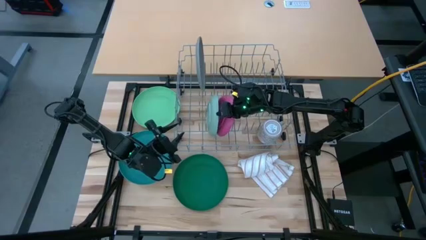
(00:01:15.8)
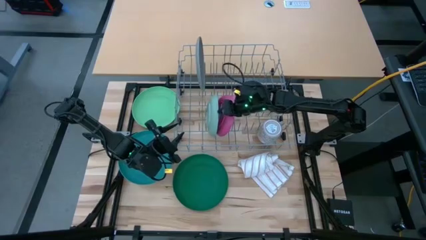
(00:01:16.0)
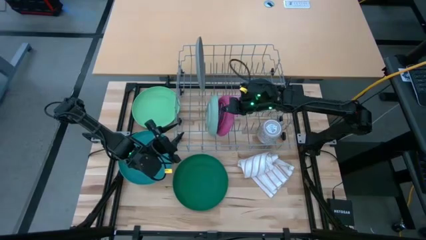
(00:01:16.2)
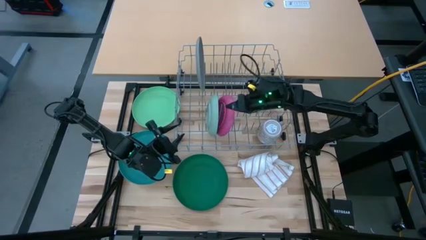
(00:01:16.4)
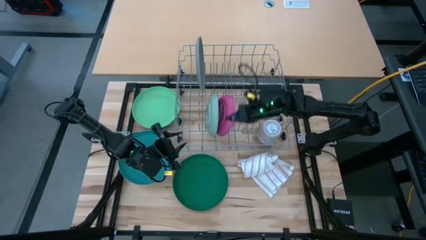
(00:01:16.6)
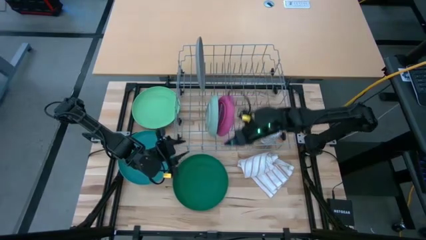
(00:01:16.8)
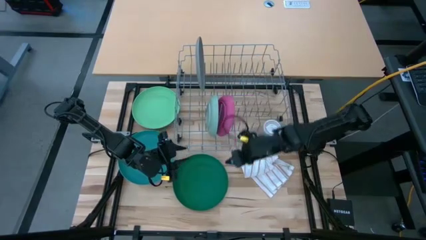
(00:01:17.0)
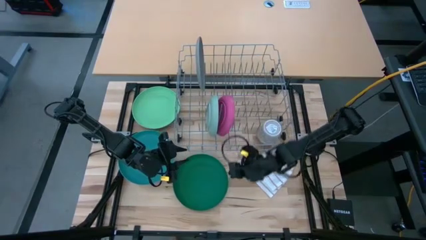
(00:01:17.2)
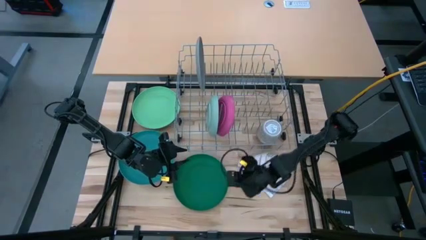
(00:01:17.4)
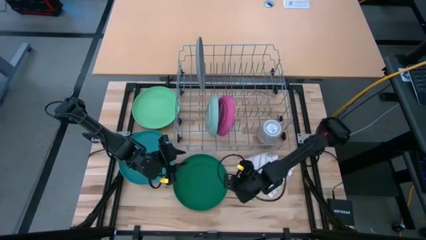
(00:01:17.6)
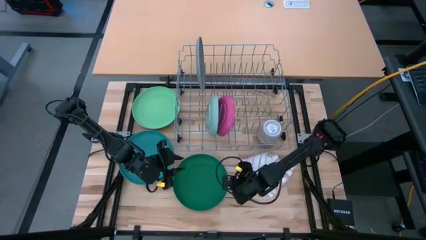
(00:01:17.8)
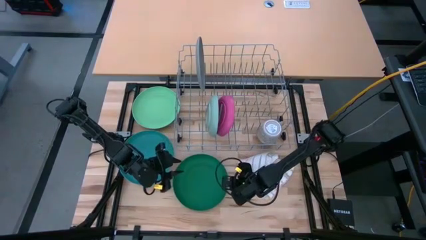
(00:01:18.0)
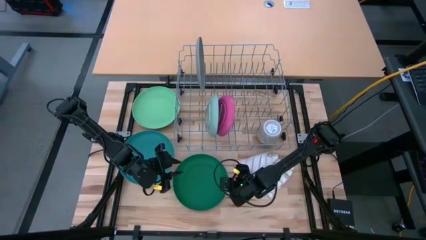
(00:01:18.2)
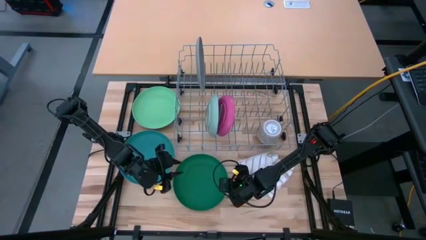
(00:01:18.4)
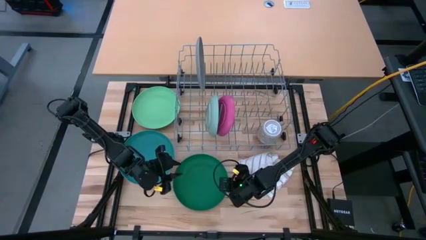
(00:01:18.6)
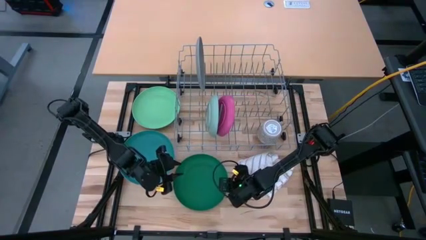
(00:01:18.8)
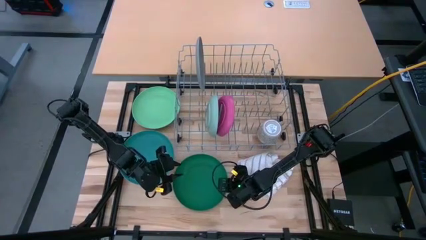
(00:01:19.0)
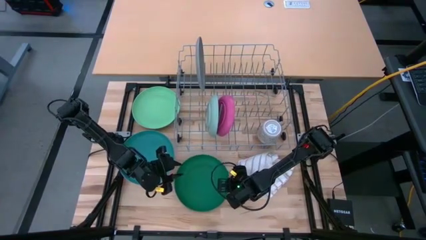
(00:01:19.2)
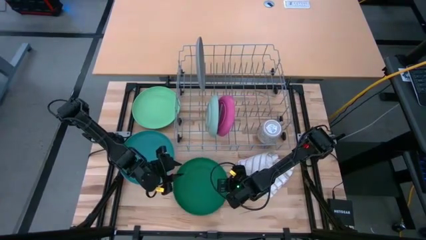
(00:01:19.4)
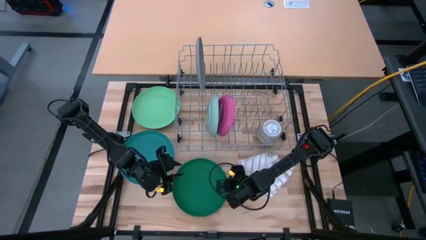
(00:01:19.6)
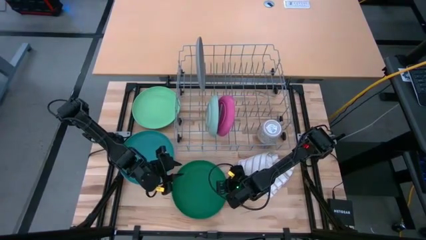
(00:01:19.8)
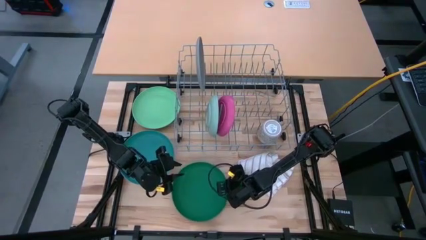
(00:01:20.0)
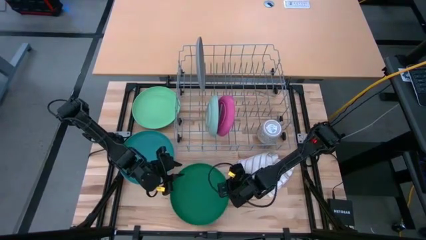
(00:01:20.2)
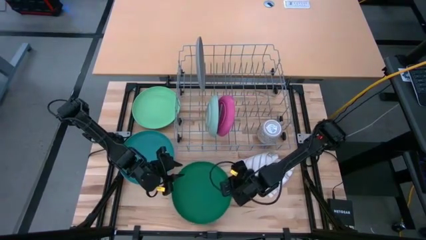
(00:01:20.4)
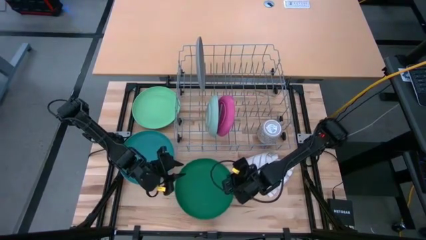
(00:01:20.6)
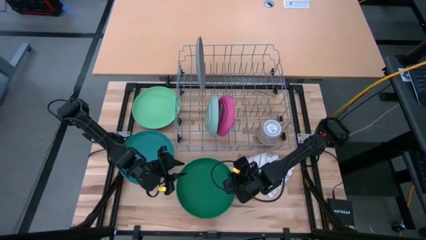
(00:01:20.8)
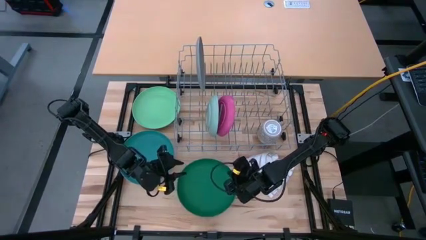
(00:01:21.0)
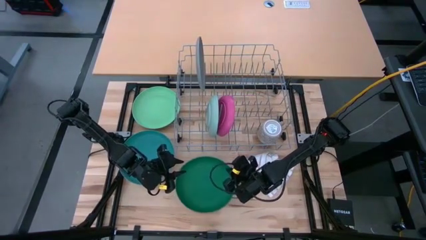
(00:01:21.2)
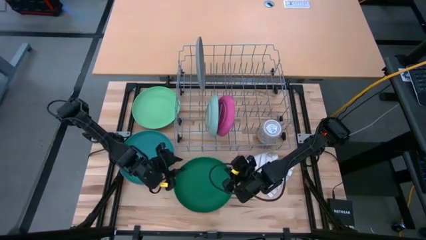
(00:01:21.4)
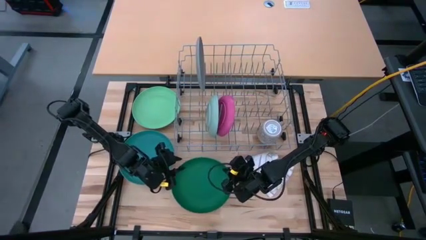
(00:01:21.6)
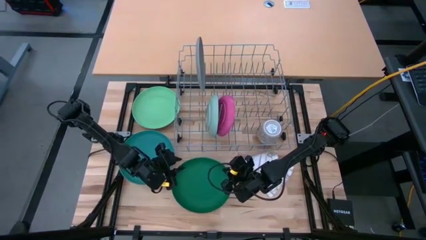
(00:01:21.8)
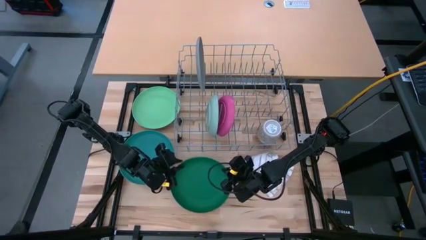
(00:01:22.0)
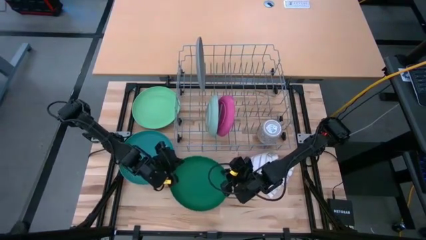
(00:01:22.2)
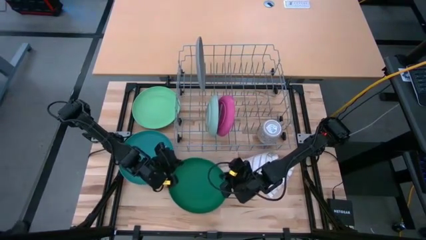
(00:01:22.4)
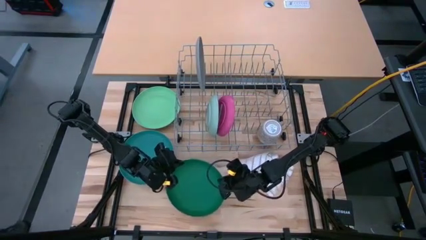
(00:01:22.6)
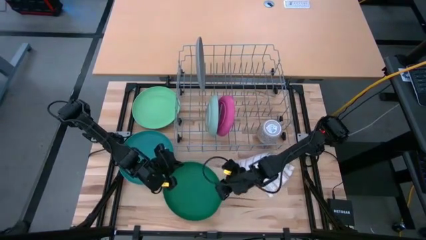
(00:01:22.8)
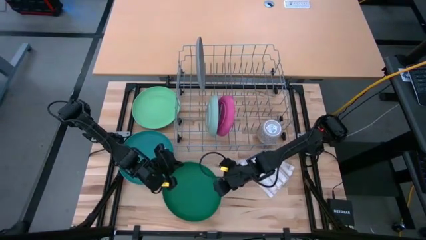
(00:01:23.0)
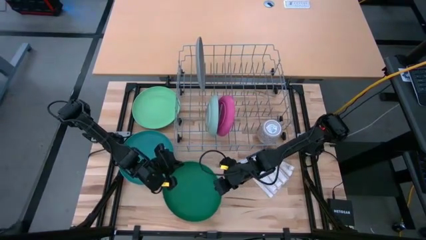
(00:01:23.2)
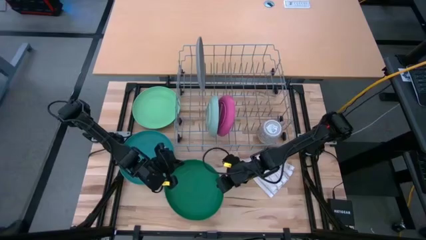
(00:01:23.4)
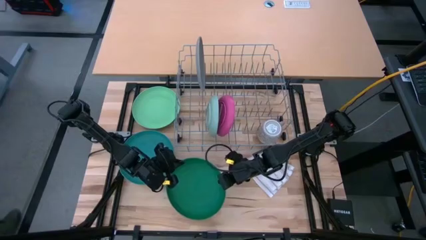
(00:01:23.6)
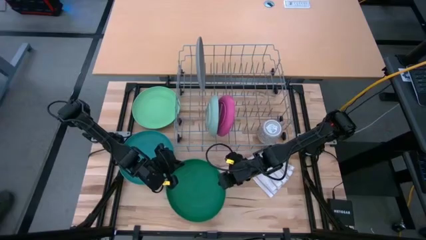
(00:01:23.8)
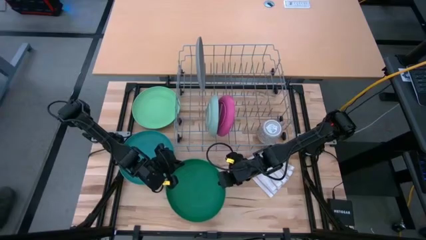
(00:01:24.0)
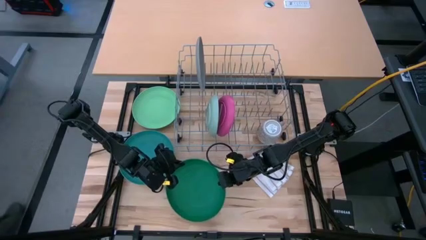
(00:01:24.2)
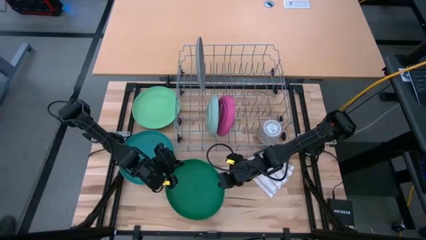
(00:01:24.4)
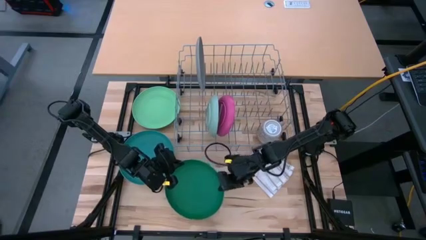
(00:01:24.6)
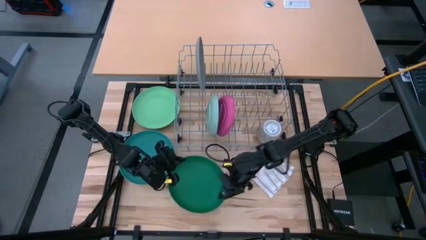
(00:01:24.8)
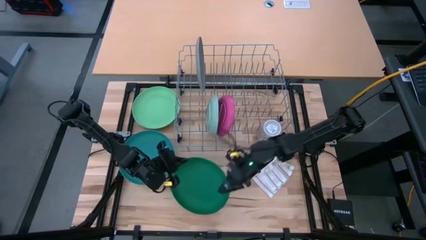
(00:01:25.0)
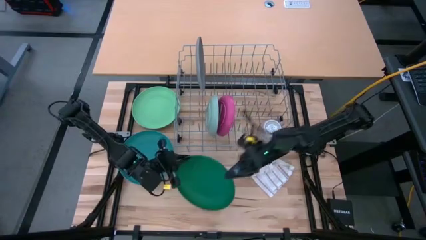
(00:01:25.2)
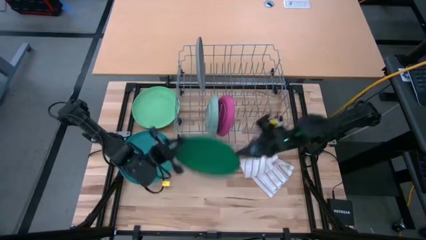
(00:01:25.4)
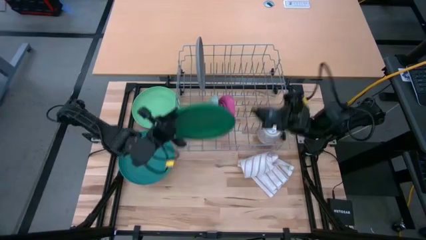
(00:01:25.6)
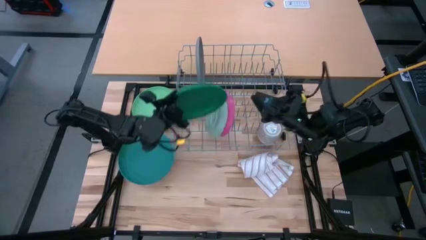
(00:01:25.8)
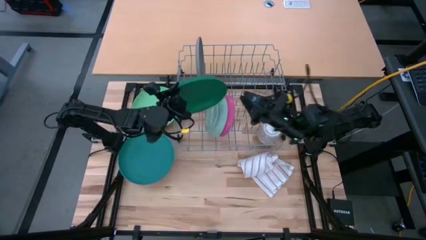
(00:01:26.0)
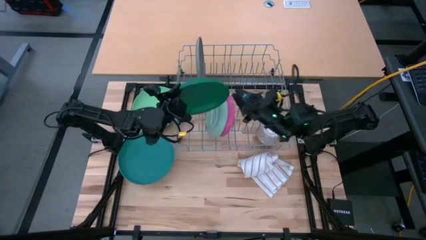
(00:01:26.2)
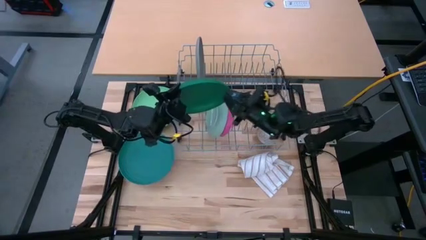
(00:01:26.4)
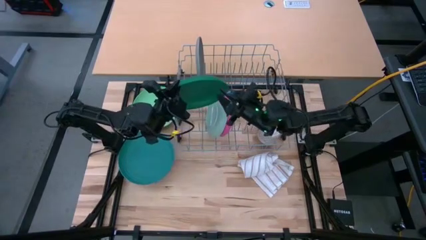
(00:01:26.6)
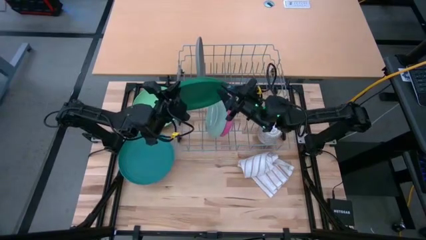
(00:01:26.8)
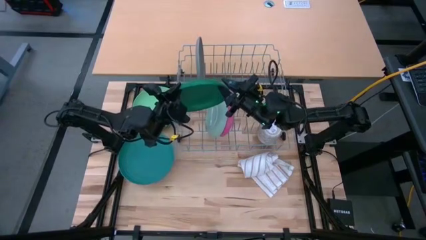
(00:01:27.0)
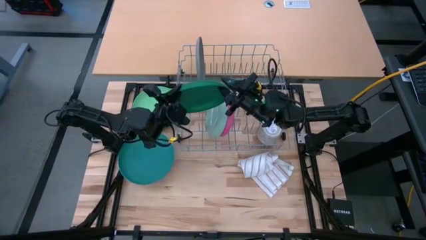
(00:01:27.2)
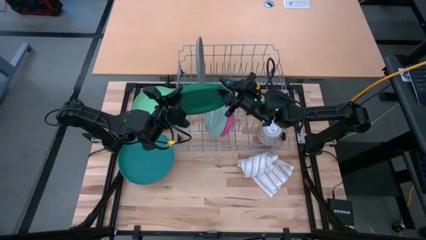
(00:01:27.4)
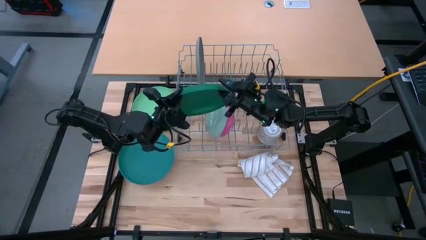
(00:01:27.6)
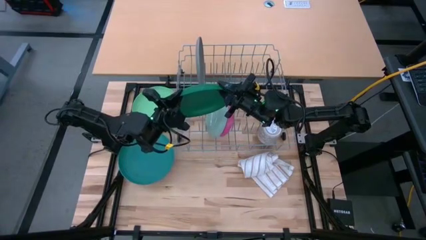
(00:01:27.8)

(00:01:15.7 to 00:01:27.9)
Task: Sort dishes
Put the dark green plate in the dish rack

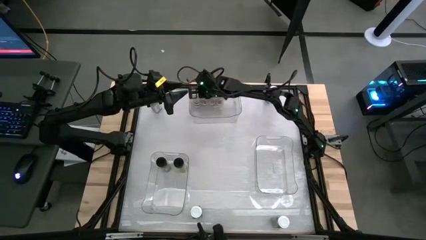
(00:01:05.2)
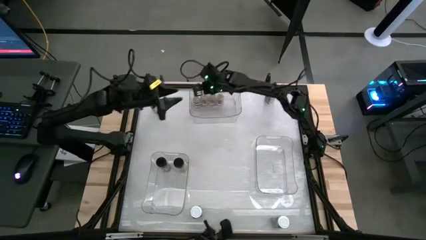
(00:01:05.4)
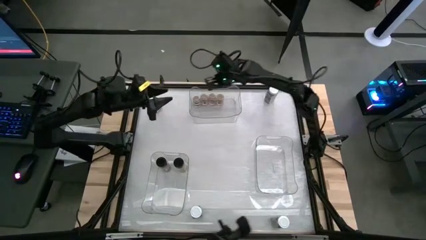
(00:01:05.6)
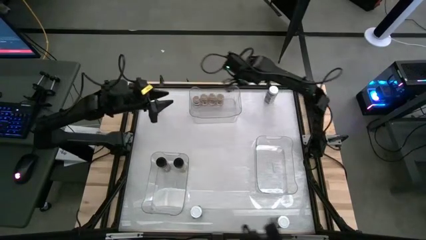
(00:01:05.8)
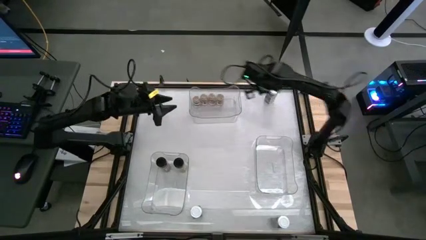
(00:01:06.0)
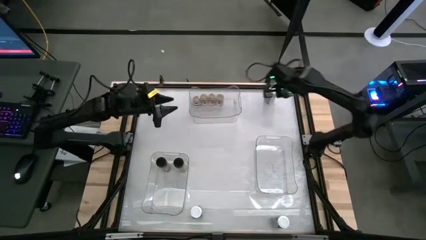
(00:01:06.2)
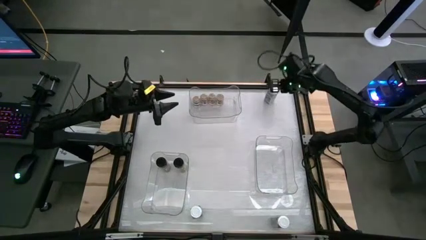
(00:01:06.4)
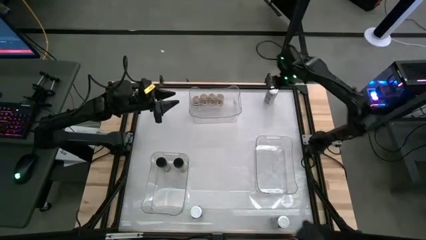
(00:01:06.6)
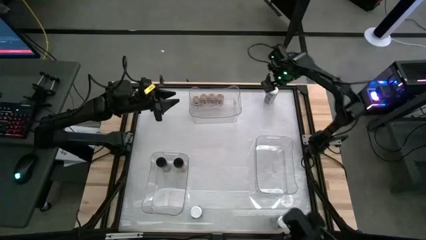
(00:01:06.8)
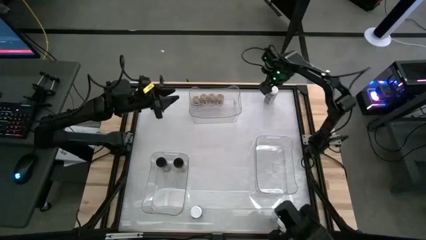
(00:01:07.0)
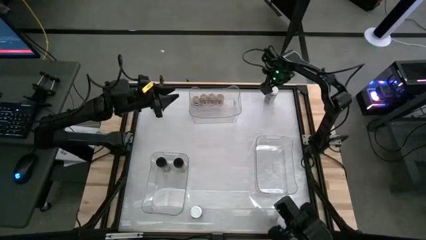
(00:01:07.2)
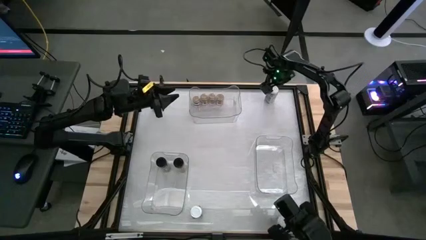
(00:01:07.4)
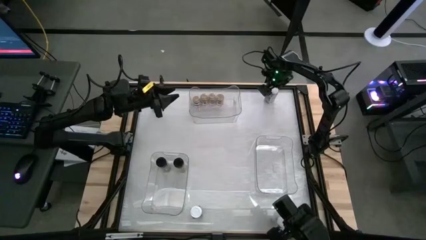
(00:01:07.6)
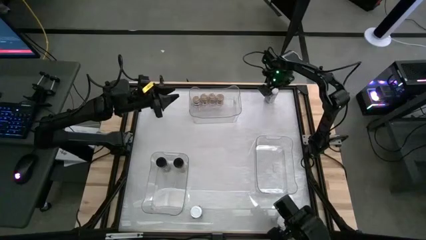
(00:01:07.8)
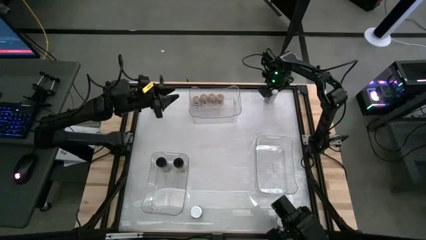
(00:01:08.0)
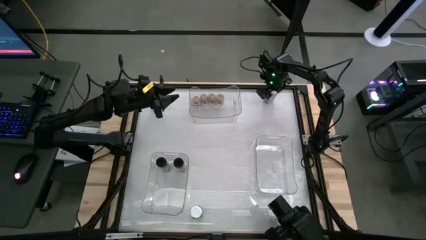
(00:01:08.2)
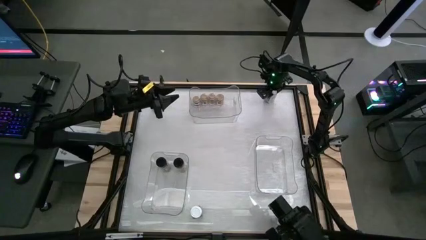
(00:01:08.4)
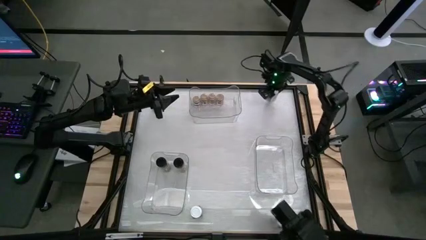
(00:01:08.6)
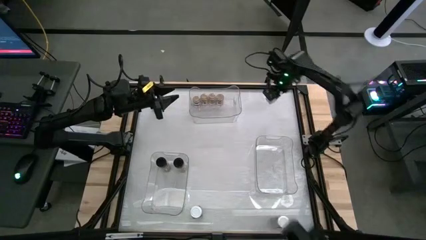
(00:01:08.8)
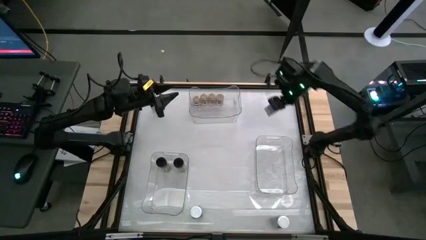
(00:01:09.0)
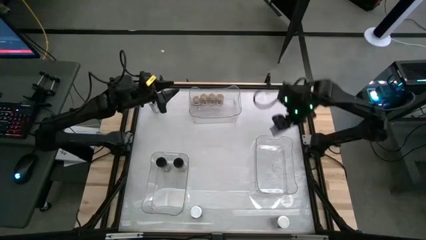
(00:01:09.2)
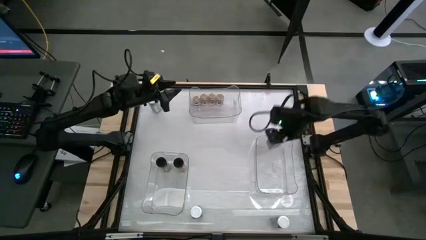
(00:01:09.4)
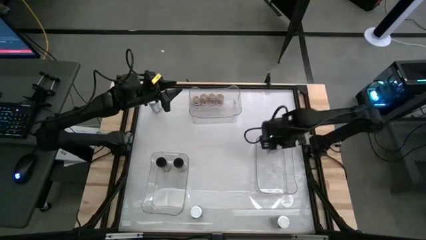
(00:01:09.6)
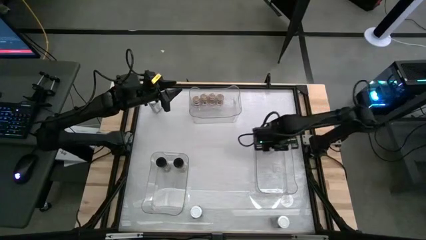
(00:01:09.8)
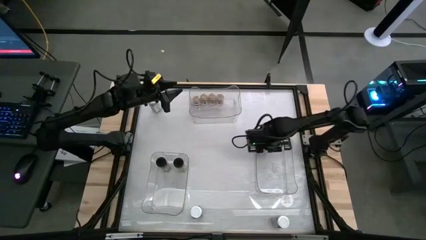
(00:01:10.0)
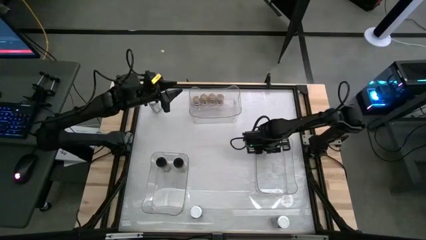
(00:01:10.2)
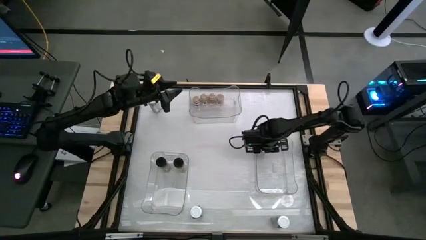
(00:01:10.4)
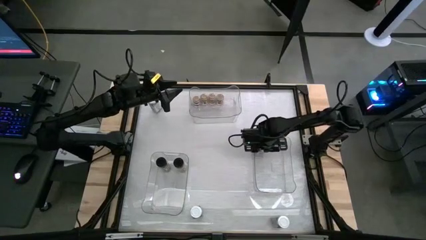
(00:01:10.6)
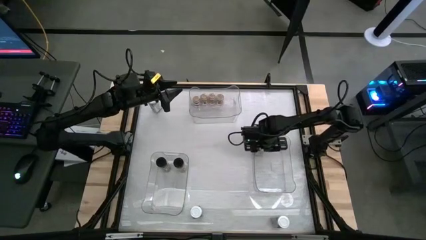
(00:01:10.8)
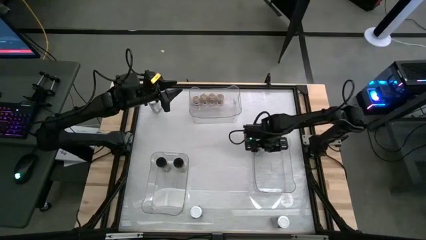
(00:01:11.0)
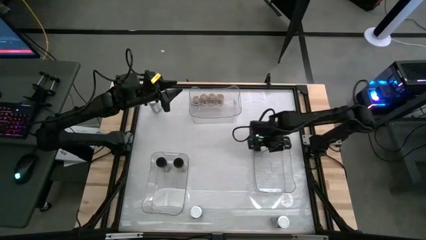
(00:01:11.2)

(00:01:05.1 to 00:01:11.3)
Task: Sort spices by type
Put the white seasoning bottle into the bottom right transparent bin
